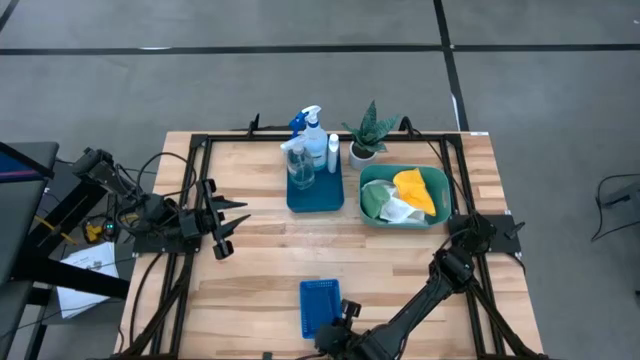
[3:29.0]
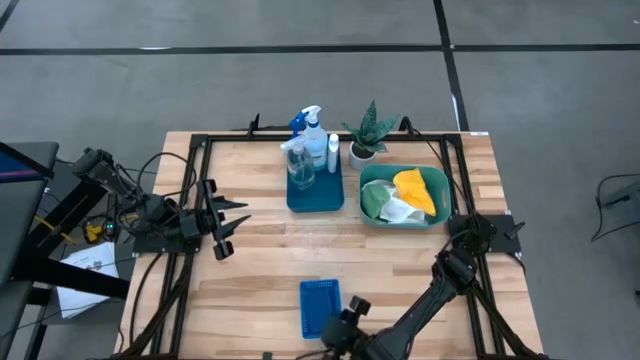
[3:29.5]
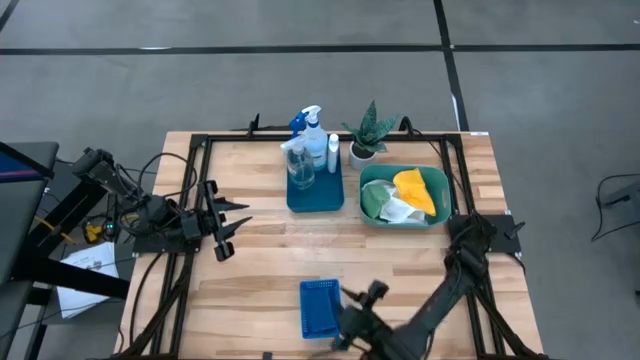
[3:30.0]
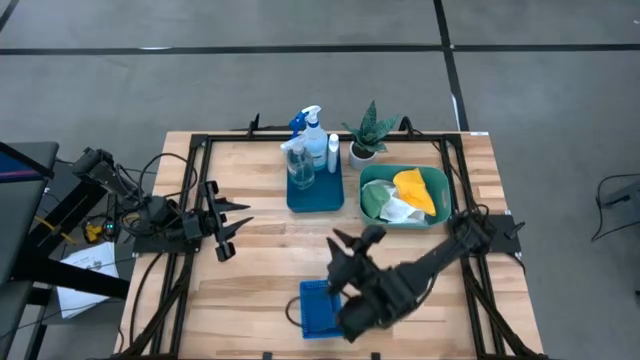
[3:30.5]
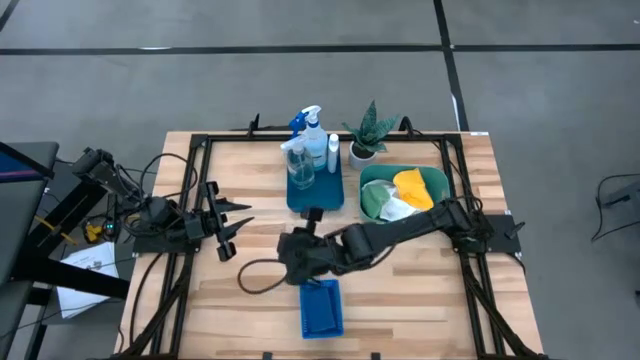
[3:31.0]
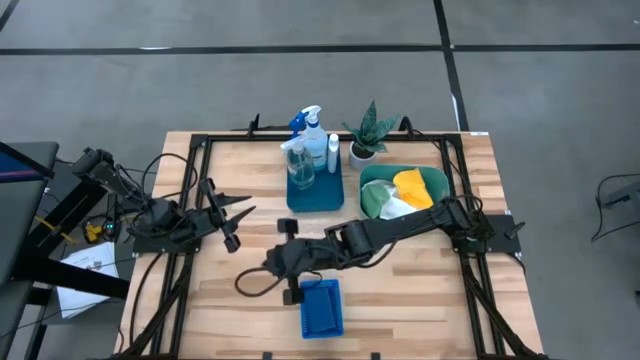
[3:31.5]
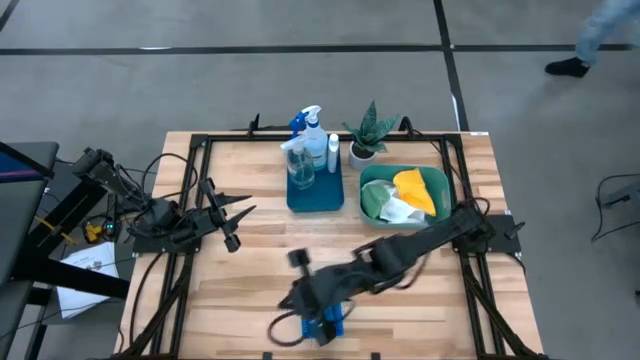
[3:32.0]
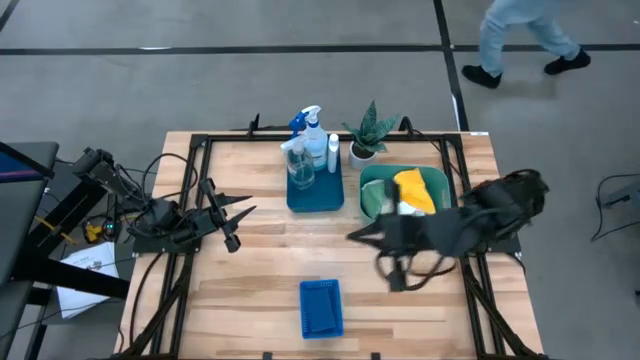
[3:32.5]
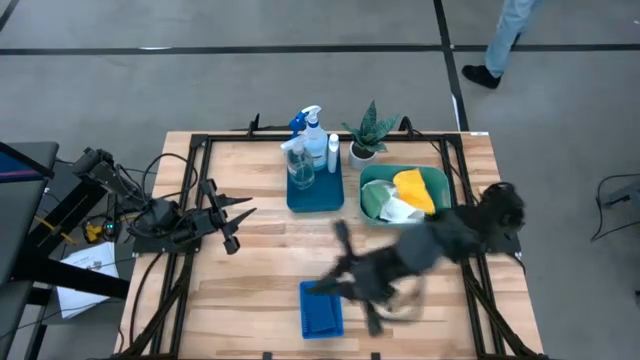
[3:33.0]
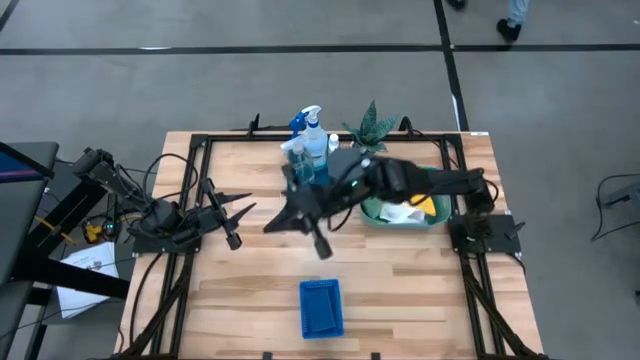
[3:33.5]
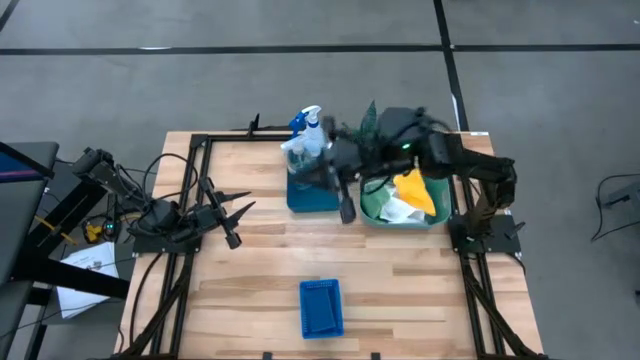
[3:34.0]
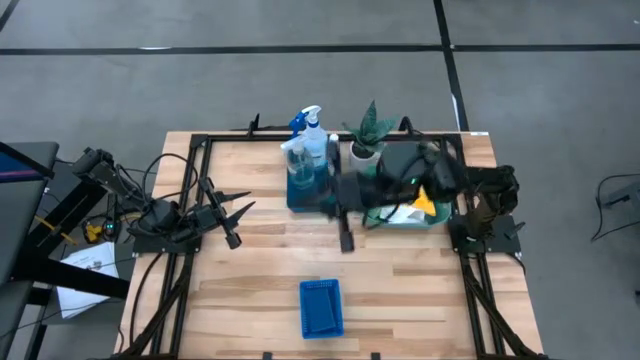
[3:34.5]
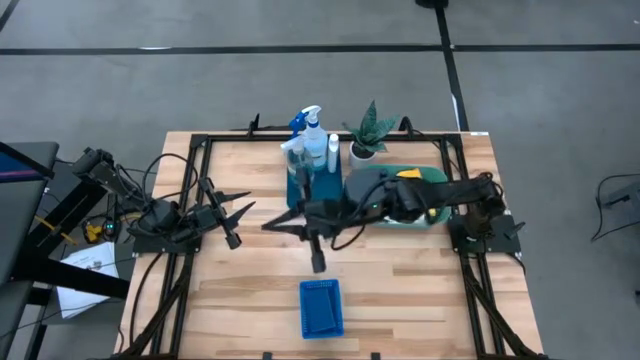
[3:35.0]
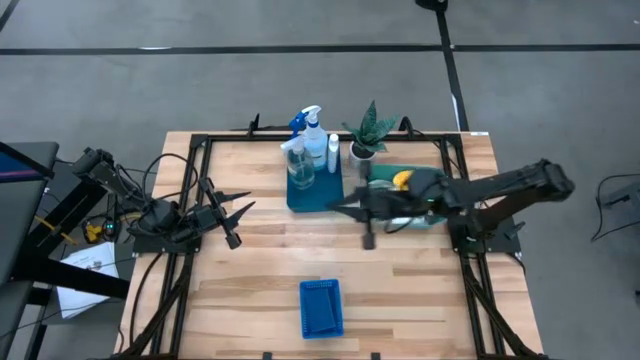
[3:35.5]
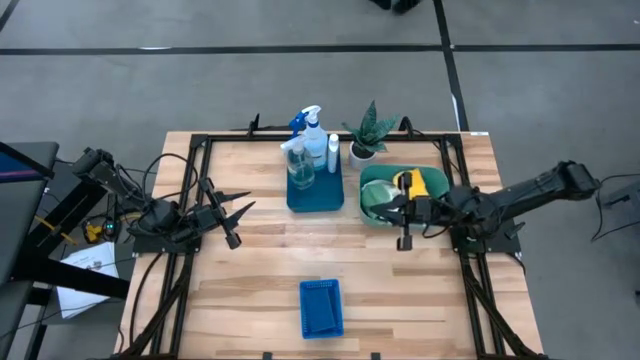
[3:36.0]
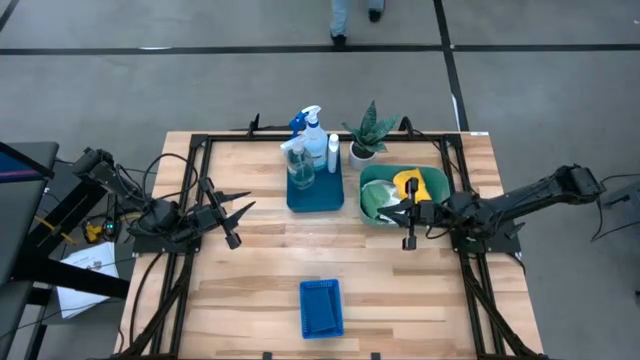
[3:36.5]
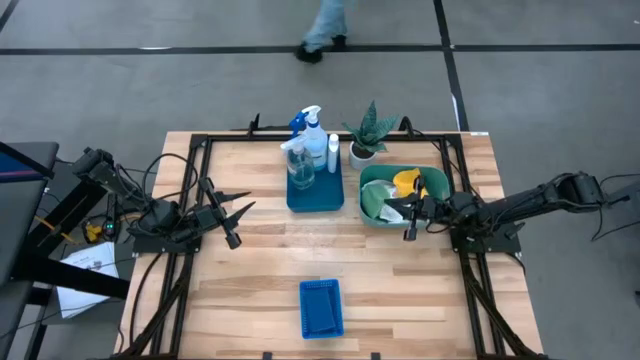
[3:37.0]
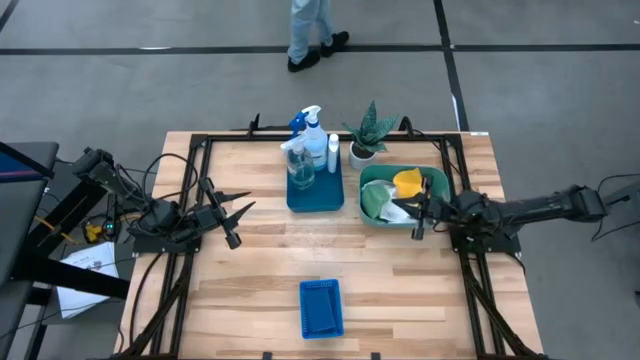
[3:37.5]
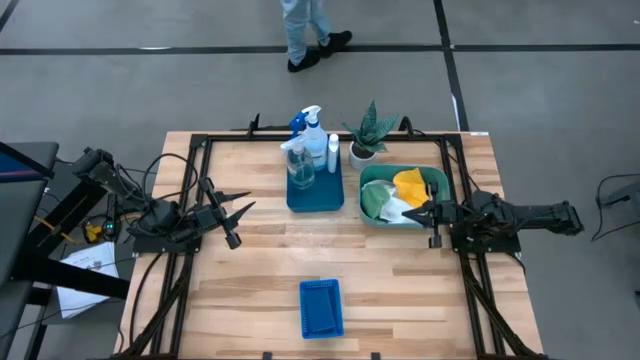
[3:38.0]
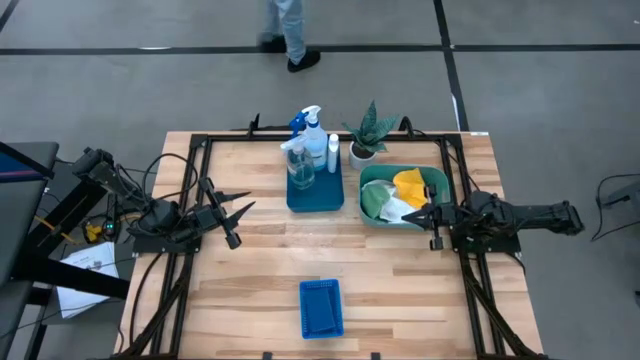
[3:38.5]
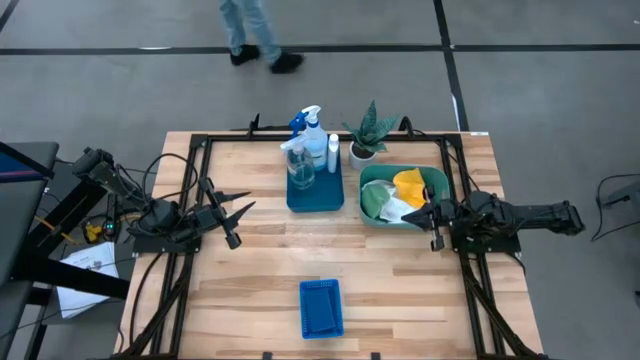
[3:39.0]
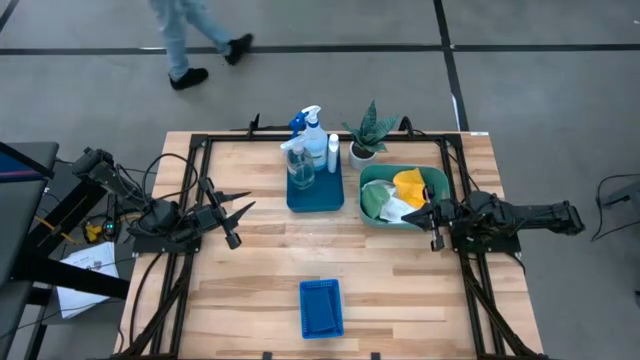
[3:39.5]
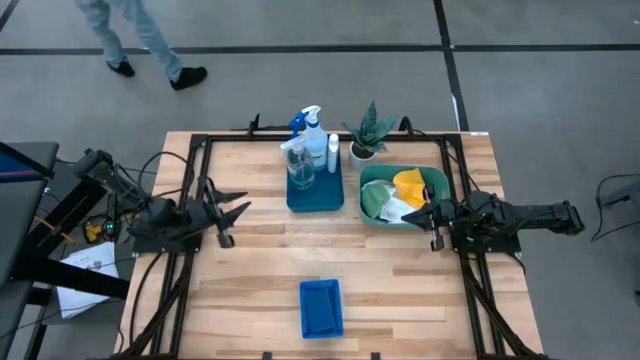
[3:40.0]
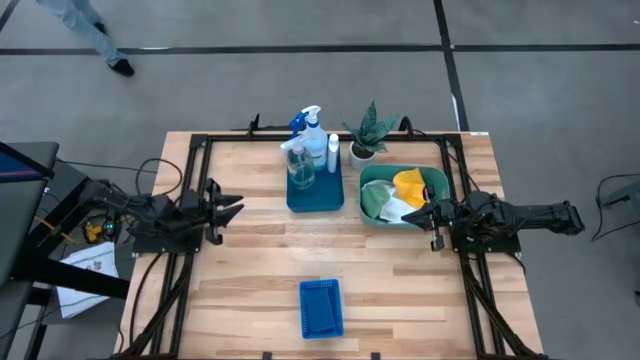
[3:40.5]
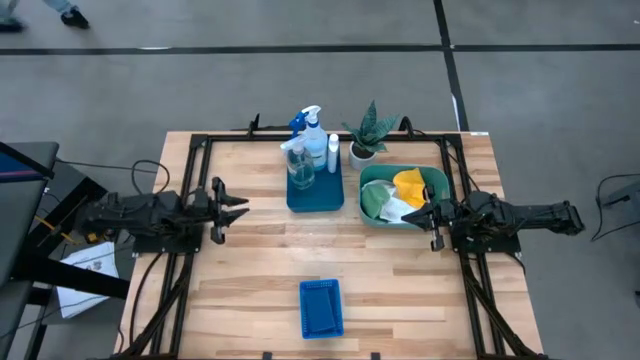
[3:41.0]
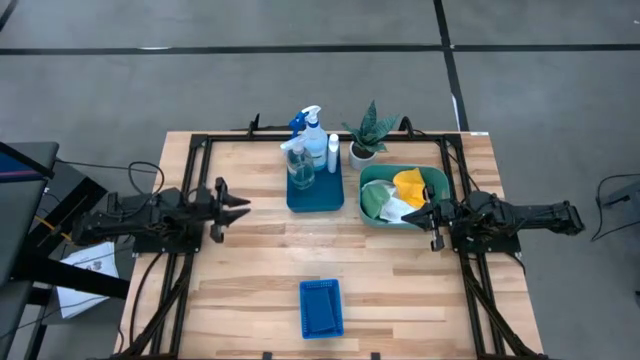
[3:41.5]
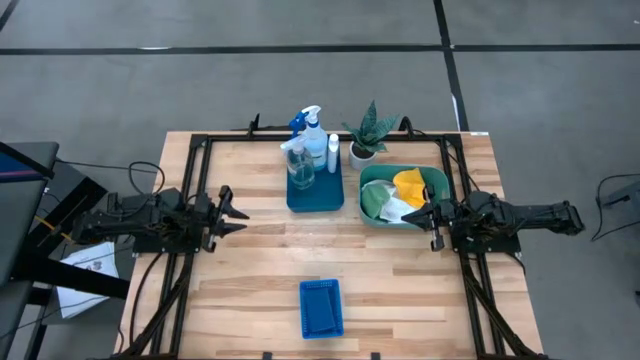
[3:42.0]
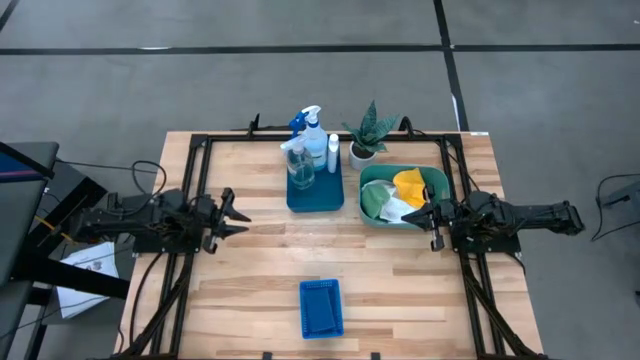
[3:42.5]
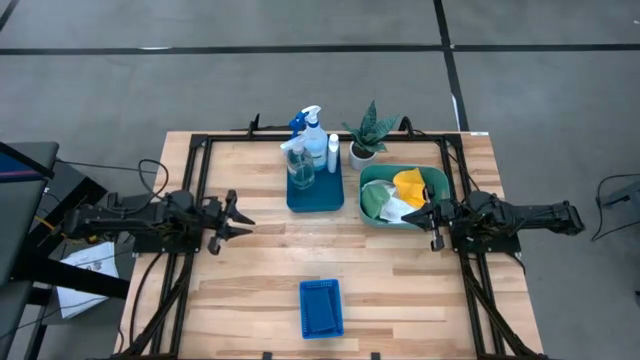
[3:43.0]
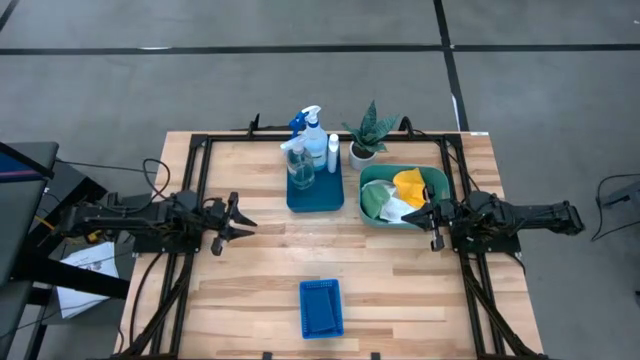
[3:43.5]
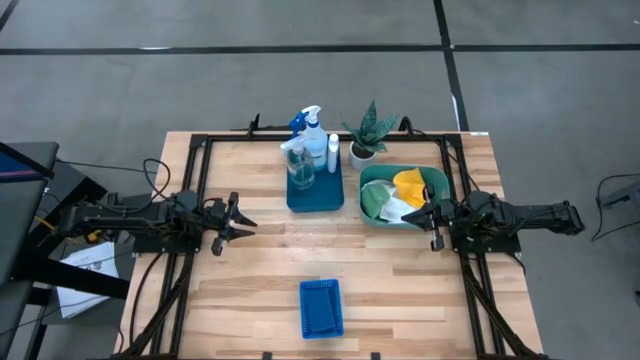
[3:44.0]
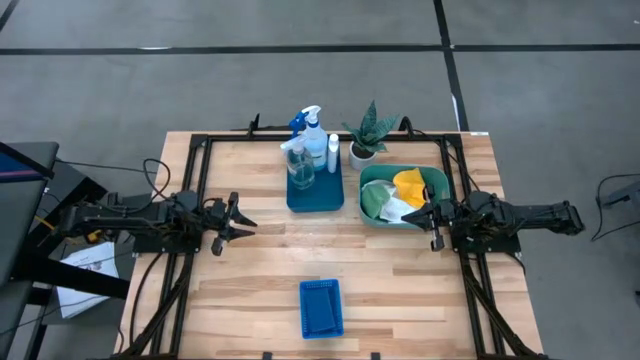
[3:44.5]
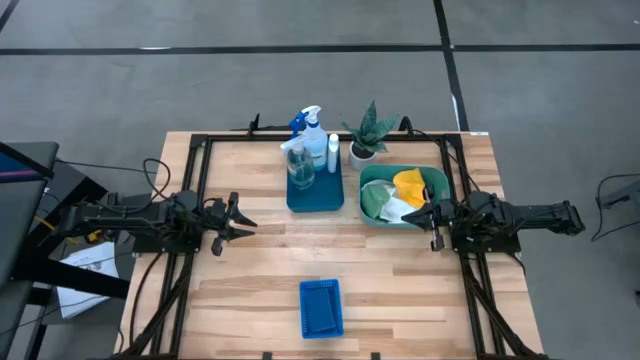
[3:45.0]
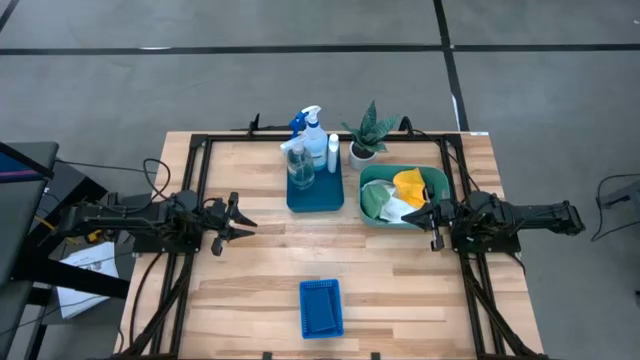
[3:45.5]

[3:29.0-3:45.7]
Task: Pick & Place Kitchen Items
Return to Home Position

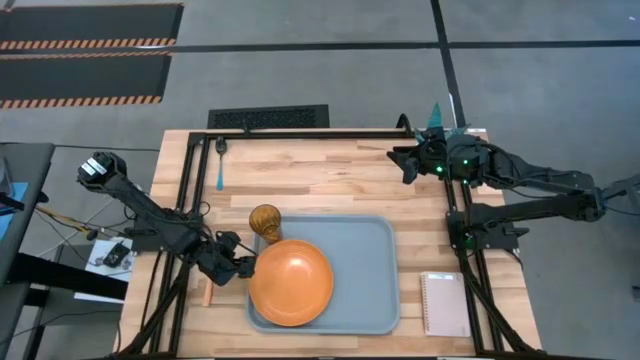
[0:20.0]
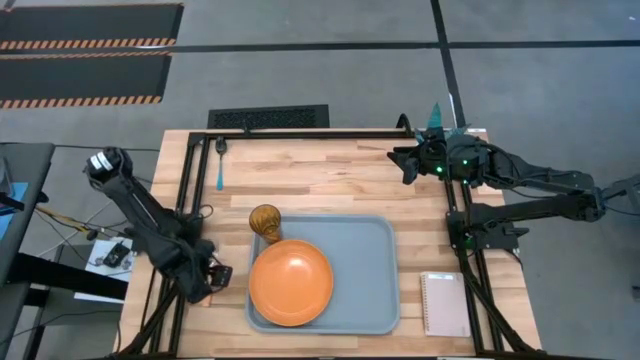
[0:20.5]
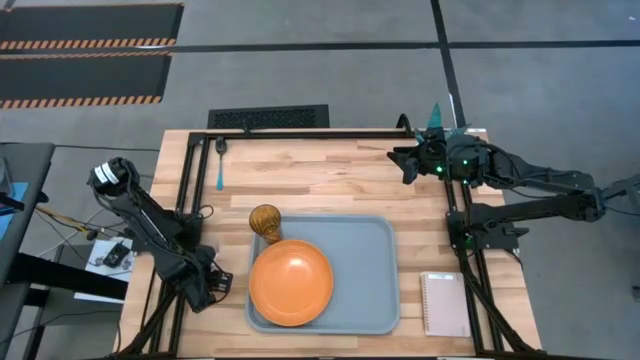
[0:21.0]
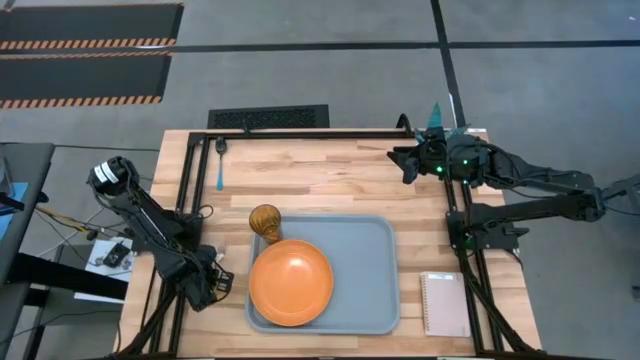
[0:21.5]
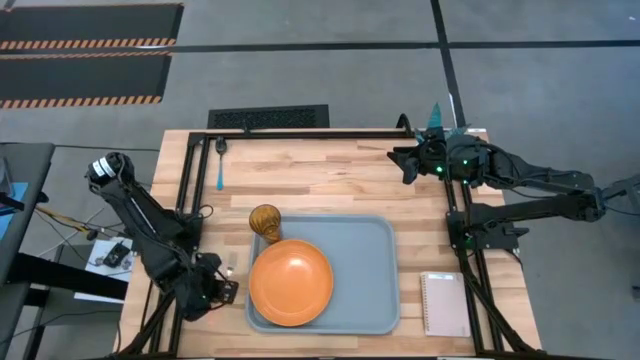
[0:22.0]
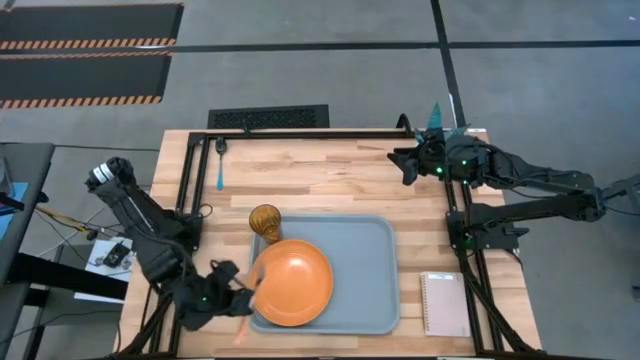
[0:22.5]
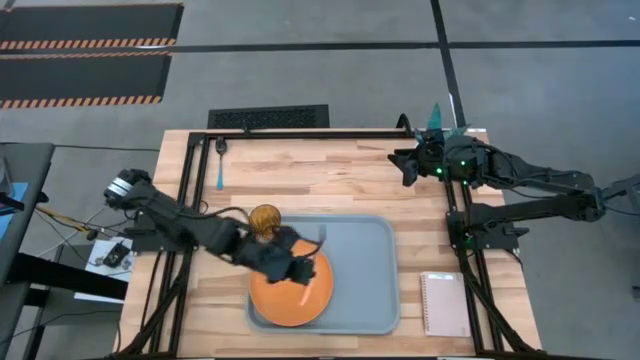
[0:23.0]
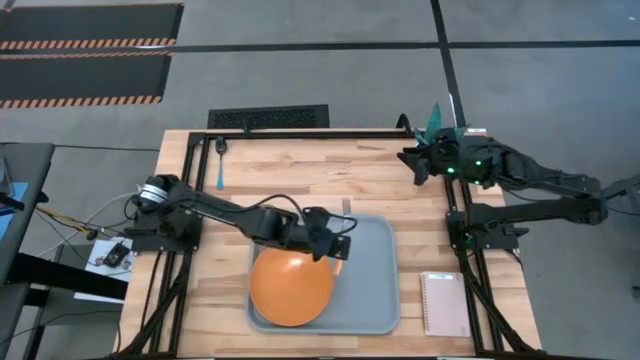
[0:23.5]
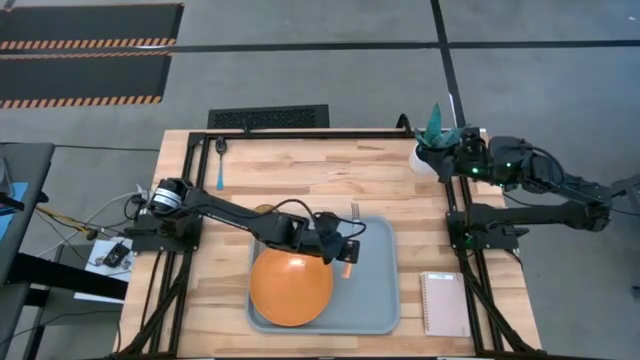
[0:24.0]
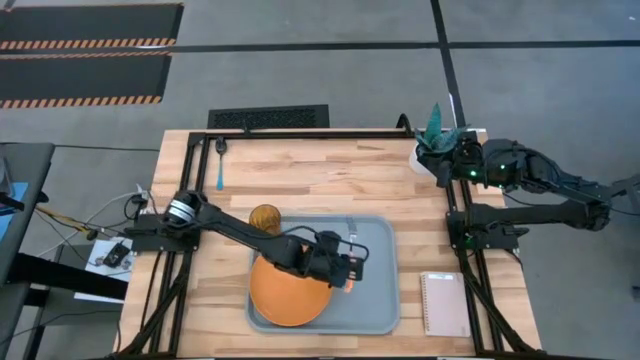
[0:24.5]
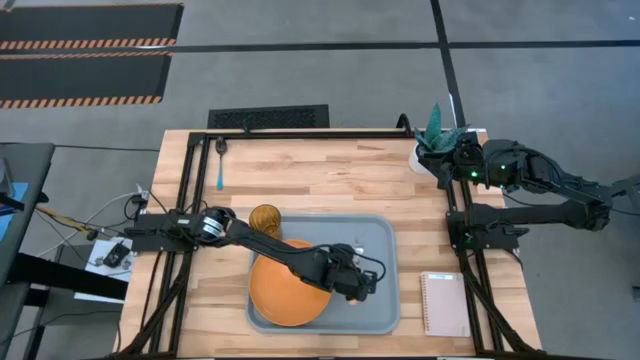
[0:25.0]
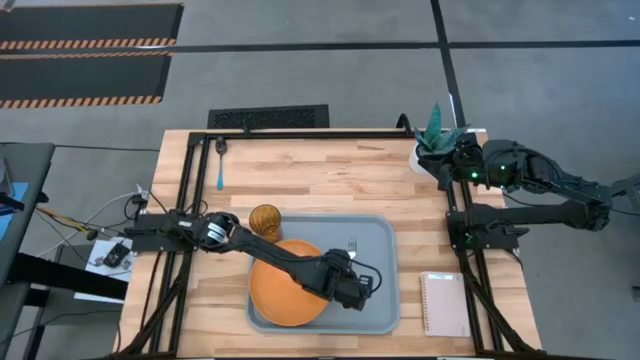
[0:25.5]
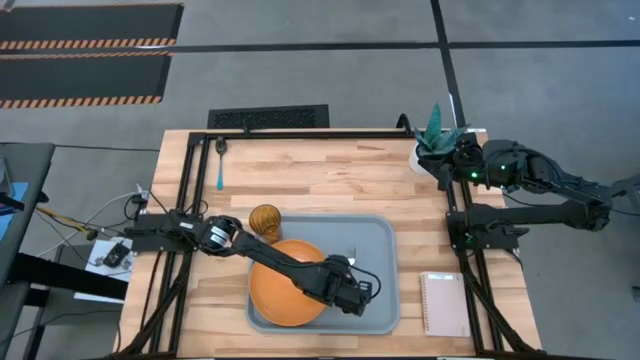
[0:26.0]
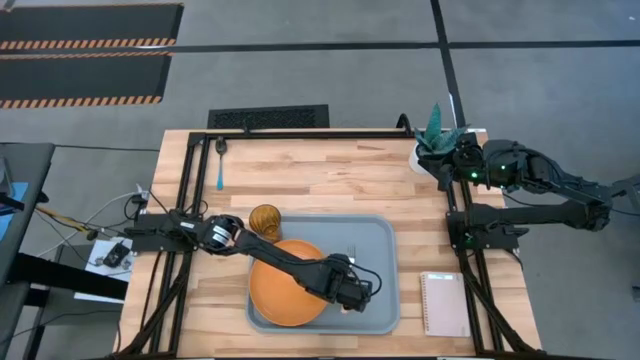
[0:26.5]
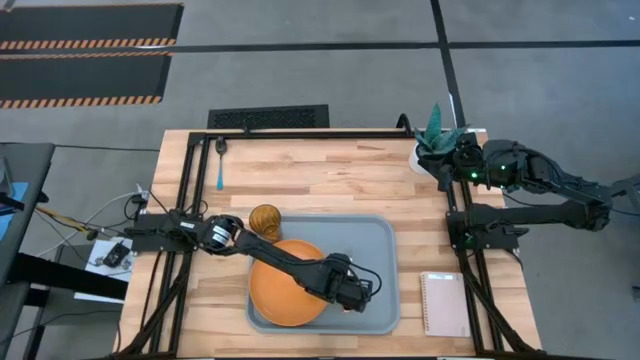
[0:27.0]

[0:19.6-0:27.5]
Task: Pick and place plate/cup/fork/spoon on tray
Put the orange fork on the gray tray to the right of the orange plate
